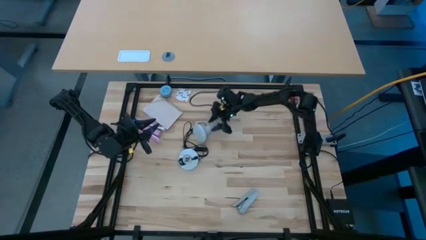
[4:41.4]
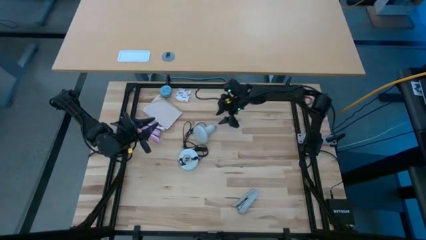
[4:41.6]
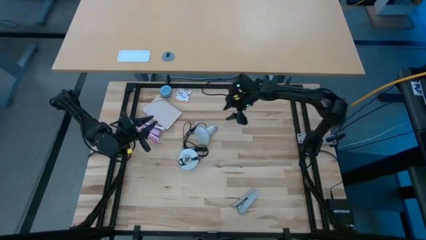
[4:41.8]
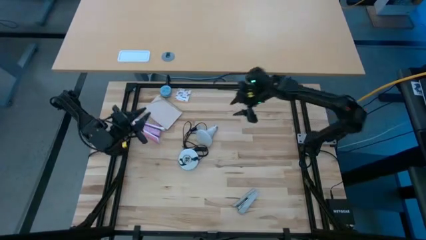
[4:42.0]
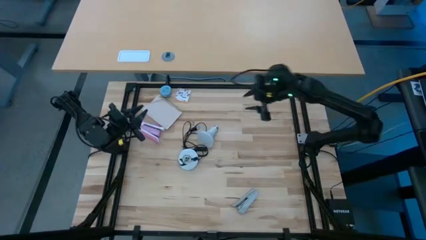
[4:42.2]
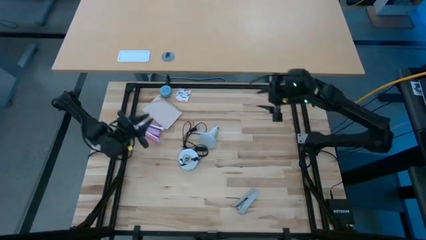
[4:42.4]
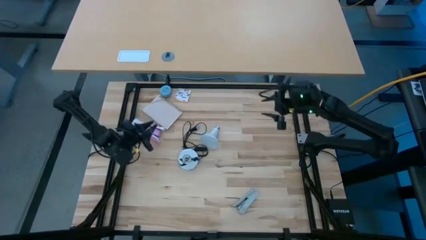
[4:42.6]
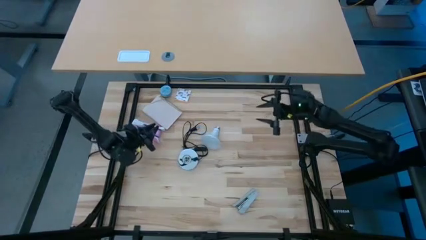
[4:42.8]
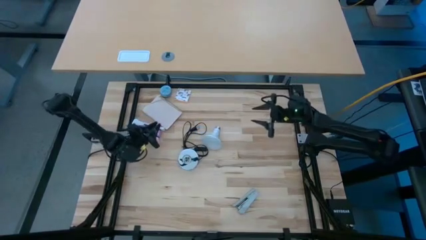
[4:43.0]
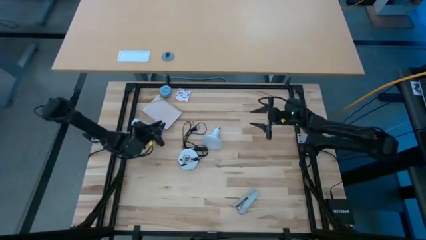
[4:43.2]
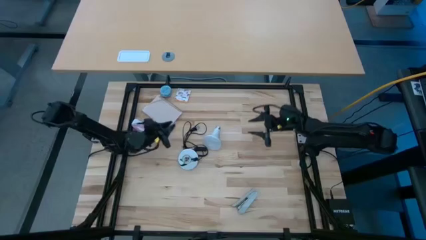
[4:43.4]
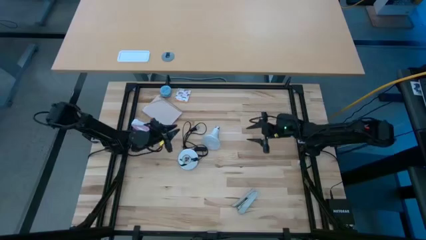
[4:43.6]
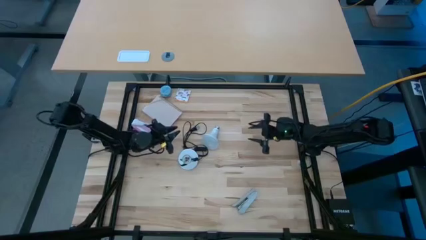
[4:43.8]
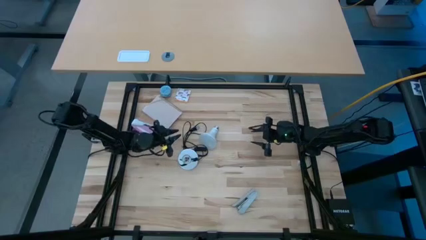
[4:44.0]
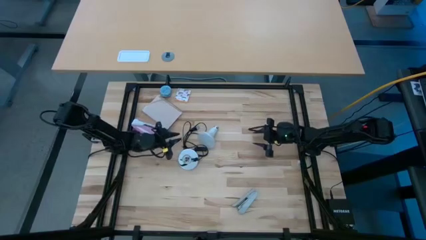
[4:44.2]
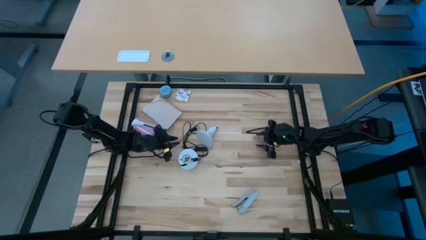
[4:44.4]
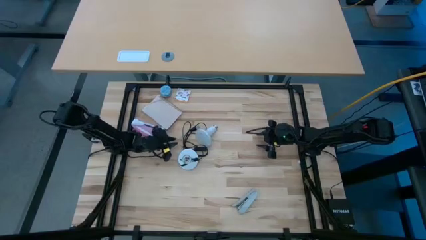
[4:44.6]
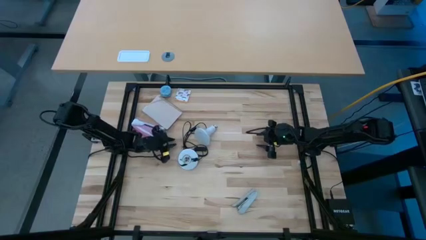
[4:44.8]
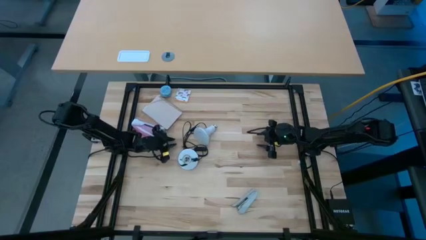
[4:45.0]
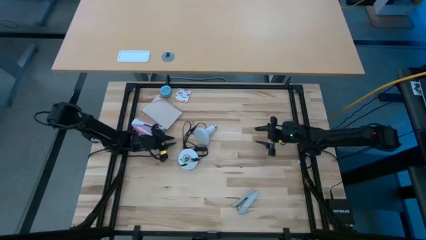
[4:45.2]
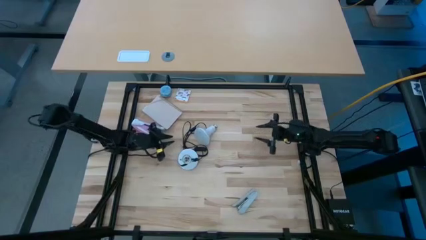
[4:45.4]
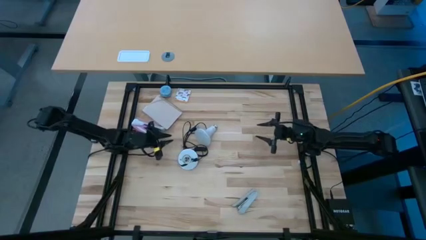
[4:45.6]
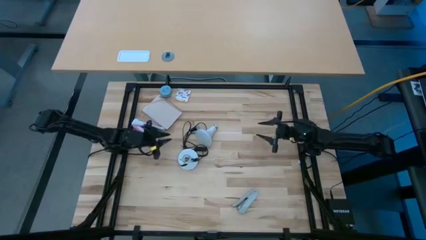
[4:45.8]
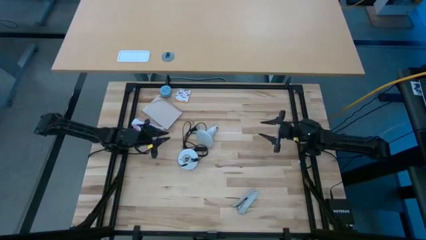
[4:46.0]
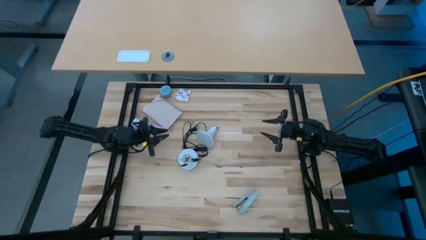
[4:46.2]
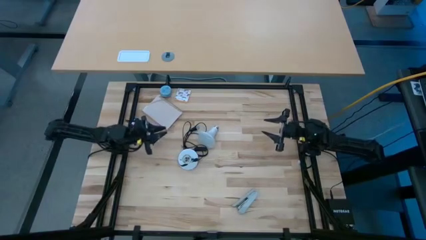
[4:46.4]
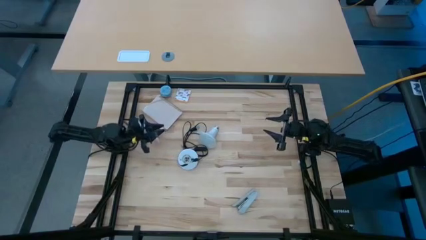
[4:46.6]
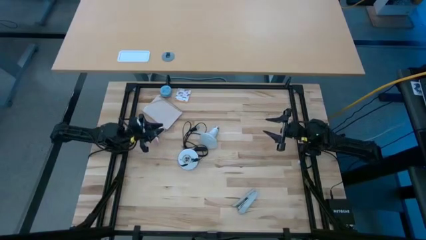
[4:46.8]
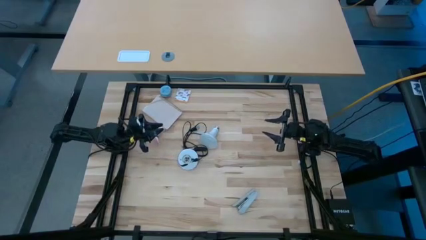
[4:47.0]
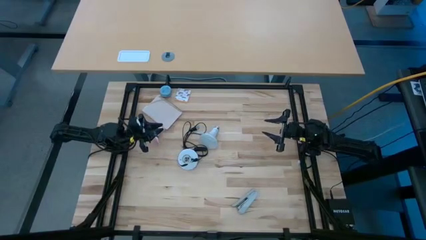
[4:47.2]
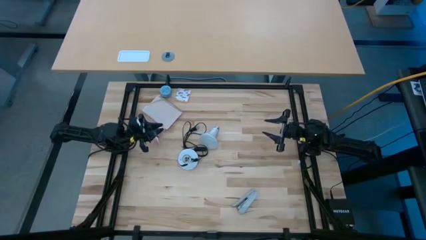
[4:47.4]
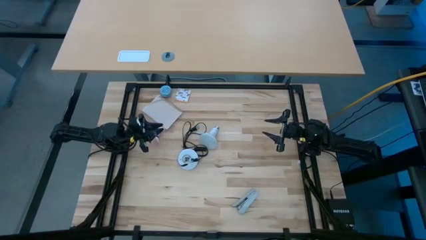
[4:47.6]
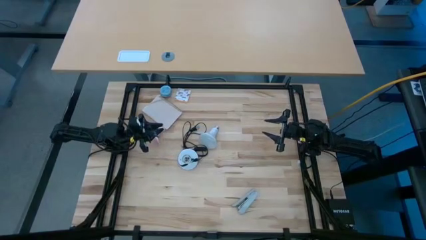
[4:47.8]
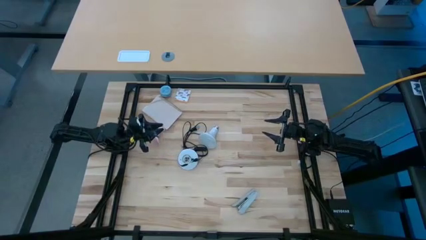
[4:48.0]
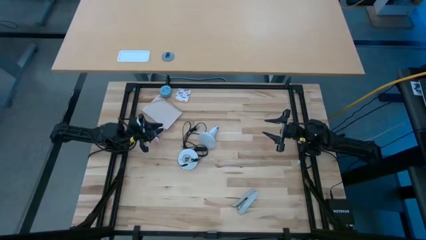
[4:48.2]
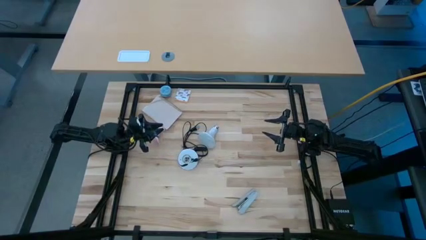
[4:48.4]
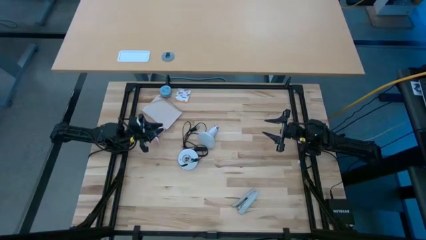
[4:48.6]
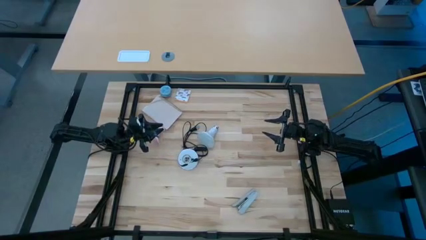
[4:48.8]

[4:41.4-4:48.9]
Task: Screw lightbulb
Return to Home Position

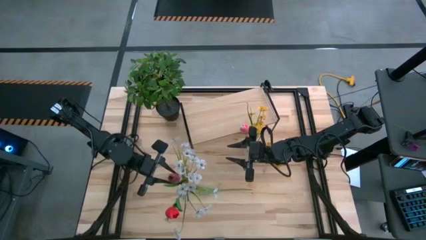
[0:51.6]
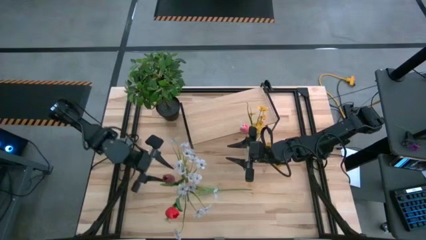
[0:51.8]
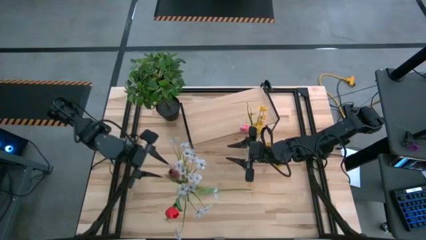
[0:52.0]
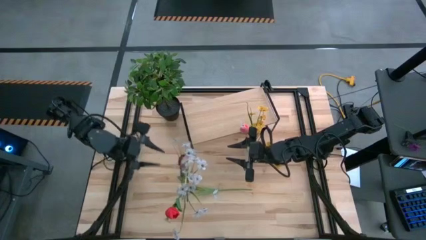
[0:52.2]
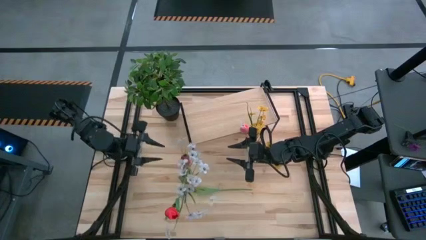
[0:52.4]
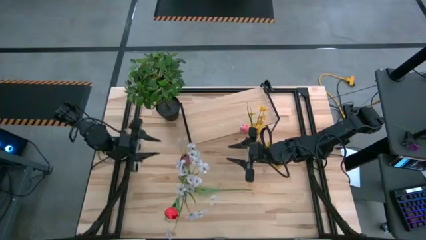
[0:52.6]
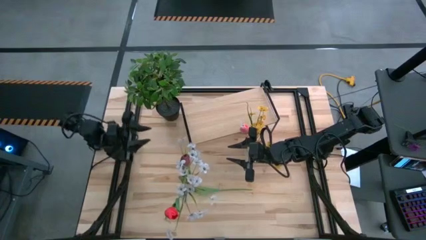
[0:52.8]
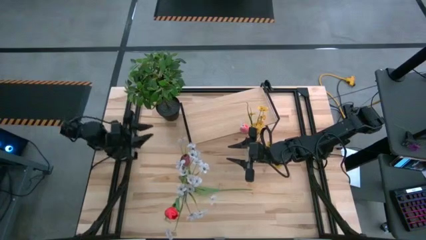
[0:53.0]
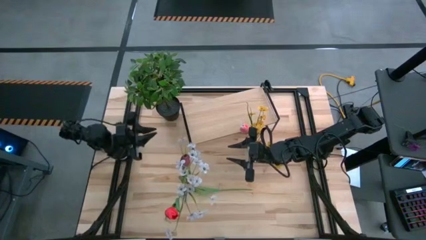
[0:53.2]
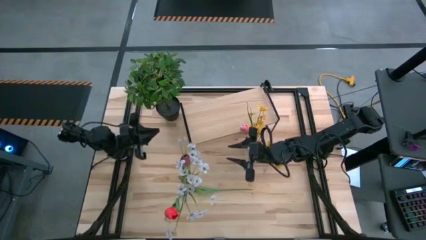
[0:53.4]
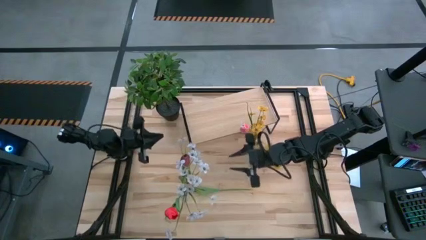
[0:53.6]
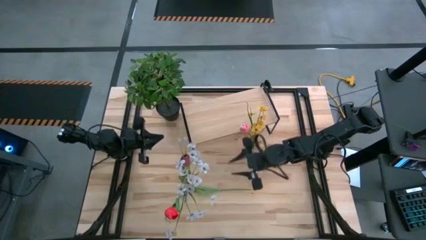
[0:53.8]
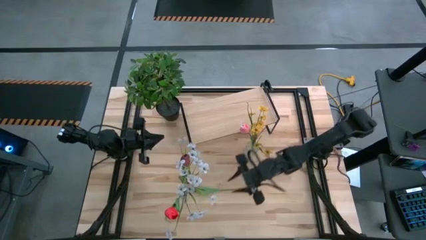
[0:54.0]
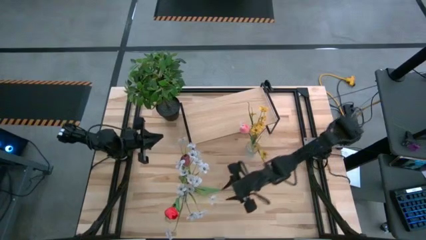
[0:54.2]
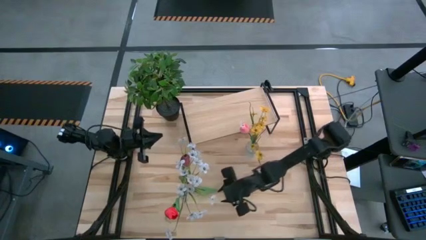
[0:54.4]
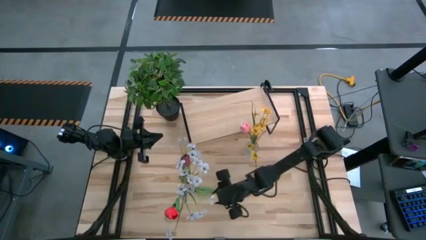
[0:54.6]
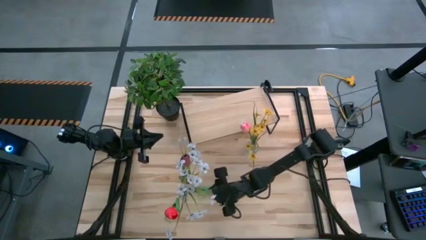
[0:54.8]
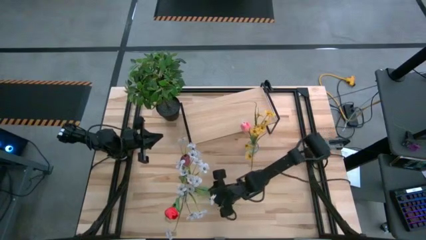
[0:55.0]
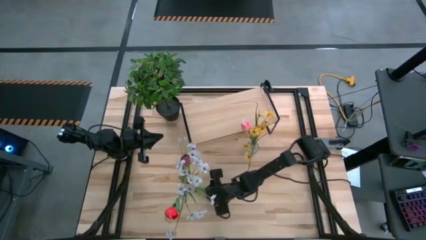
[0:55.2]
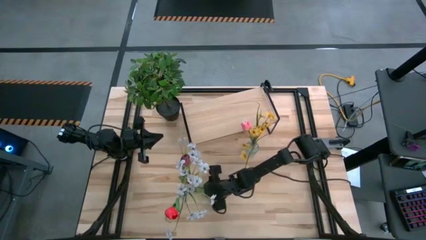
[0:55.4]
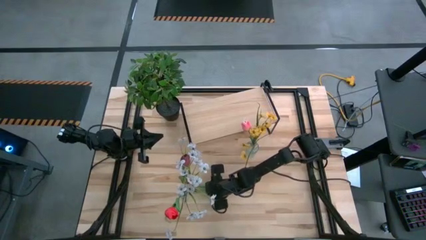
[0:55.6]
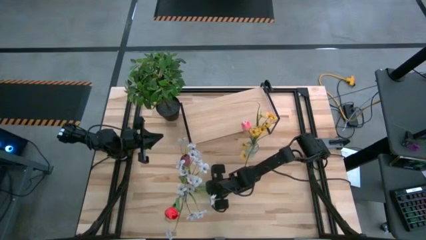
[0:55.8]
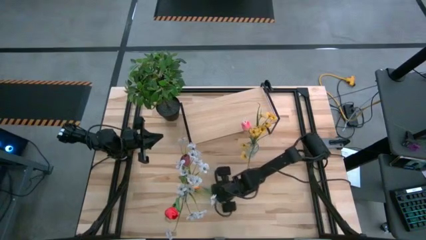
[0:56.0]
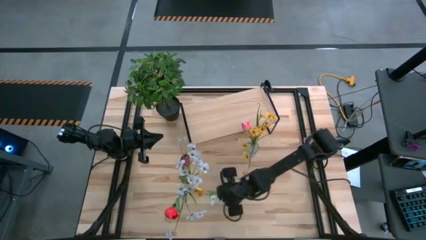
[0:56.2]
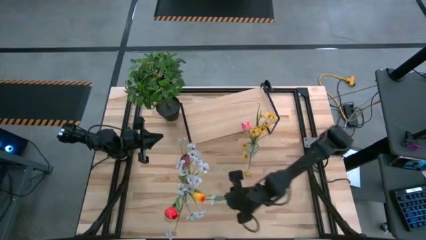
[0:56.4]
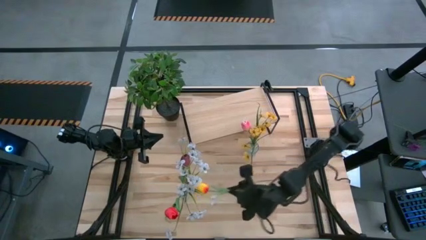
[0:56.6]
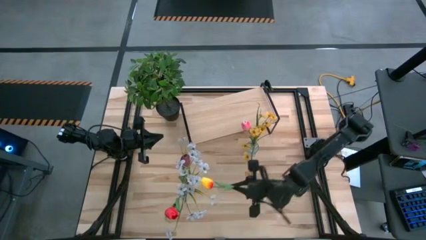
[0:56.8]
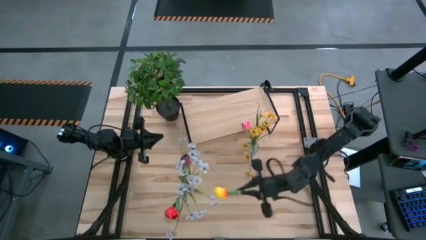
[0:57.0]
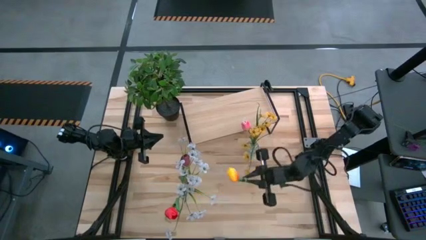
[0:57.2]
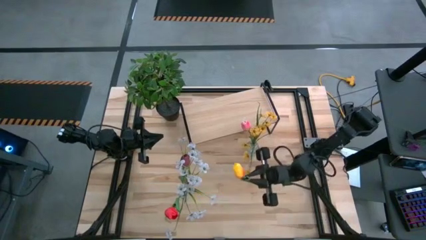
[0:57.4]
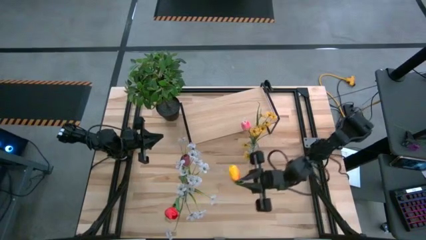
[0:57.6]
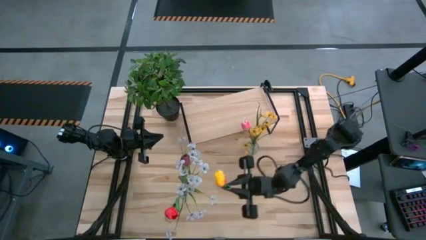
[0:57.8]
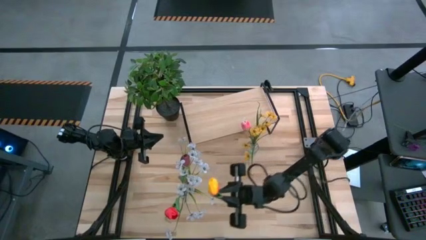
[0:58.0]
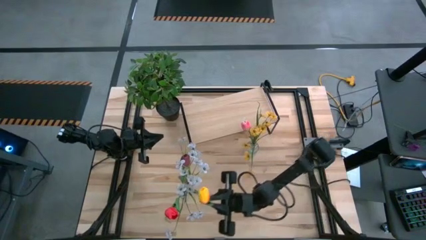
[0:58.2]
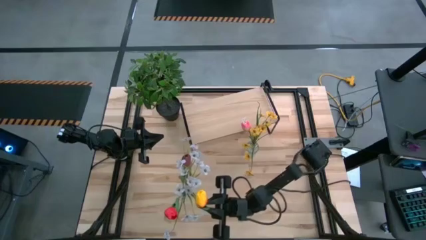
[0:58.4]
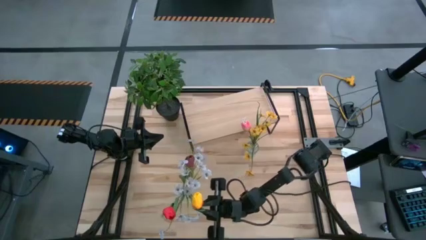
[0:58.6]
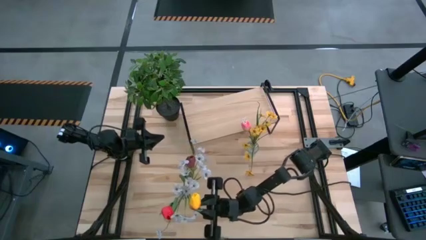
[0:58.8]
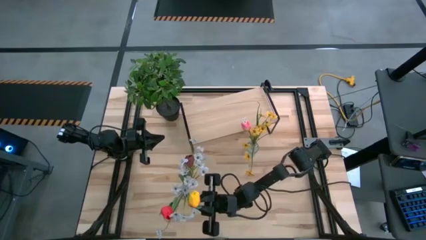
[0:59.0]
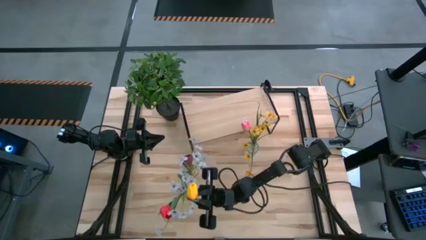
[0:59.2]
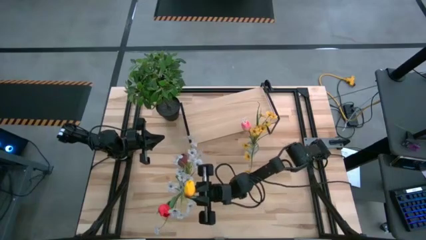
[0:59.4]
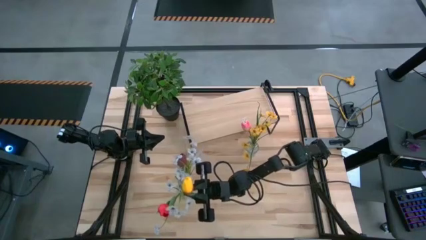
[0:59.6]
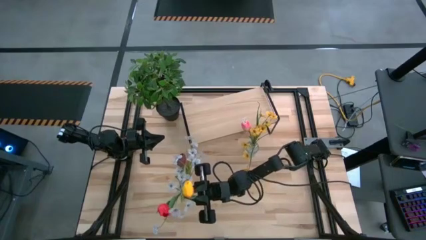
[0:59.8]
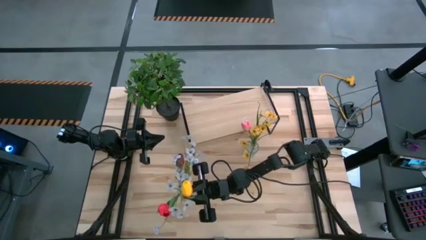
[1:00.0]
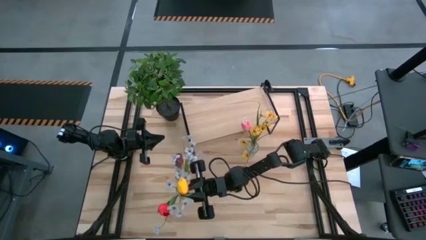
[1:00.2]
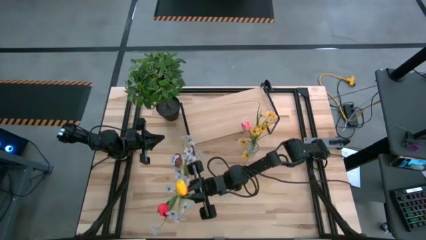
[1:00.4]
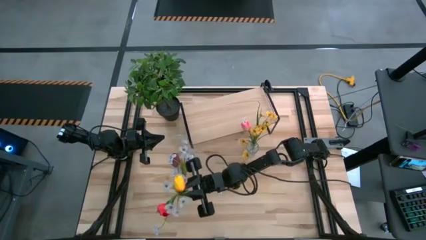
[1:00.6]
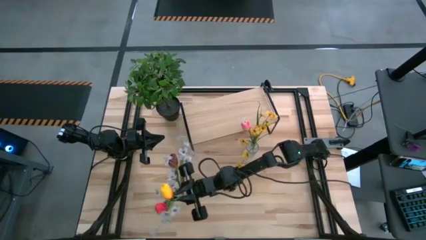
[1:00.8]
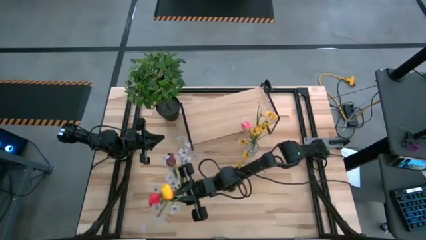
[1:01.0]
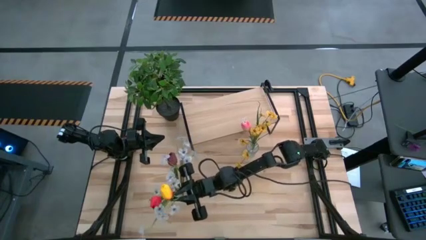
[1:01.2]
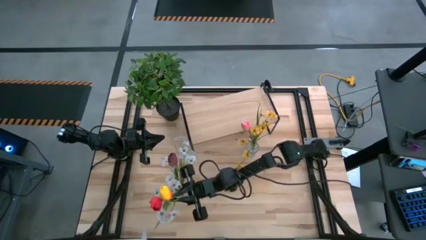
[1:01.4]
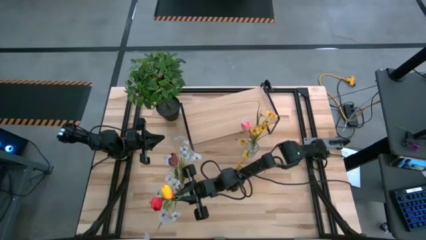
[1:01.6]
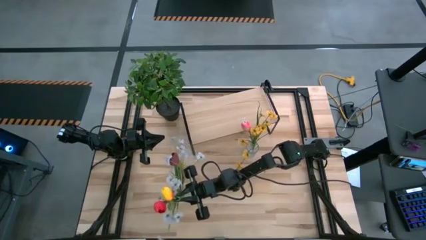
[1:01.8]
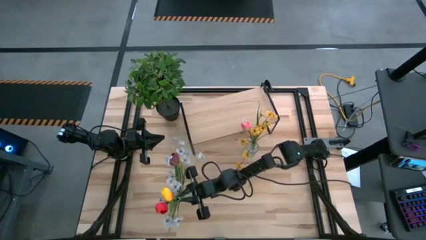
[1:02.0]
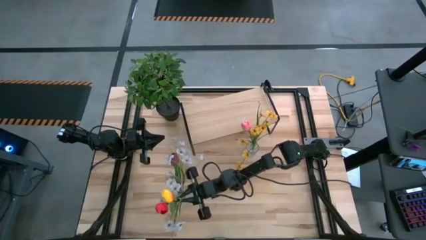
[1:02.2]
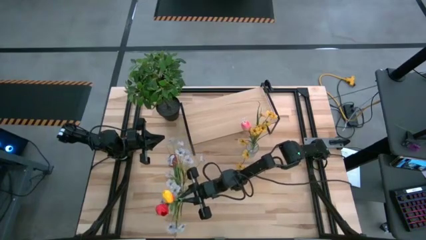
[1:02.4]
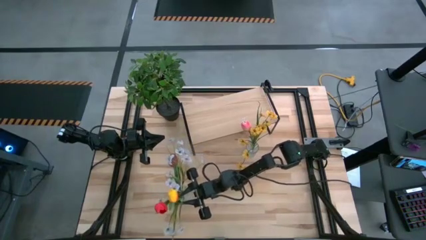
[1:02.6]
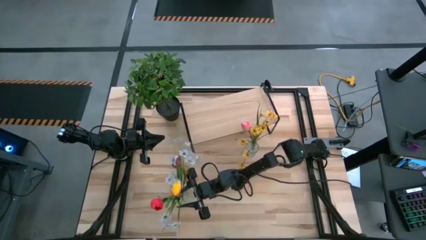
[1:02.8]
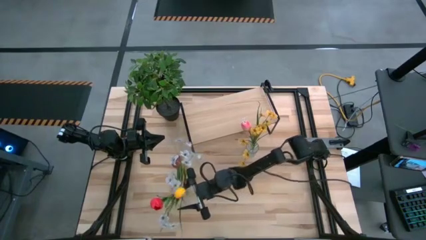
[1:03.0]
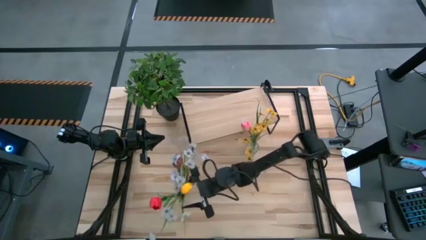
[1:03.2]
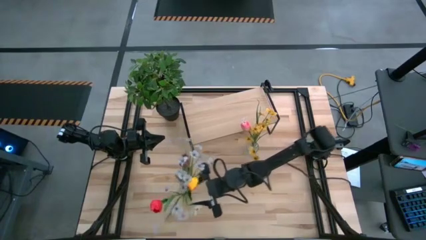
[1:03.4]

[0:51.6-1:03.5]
Task: Pick and place flowers into a vace then onto a shelf
Put the yellow and red flower into the bottom transparent vase
